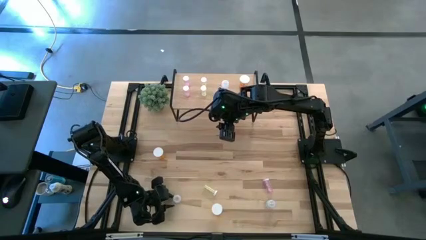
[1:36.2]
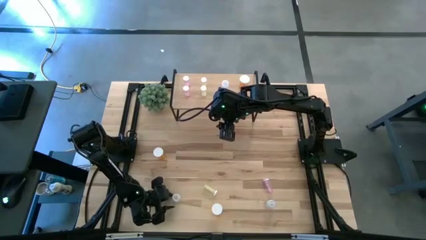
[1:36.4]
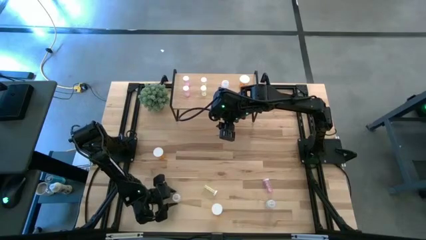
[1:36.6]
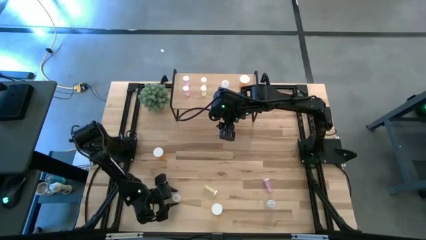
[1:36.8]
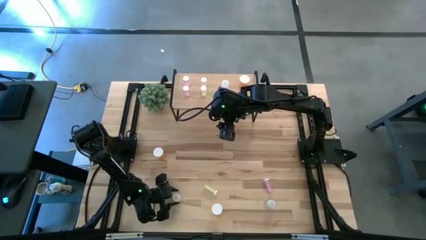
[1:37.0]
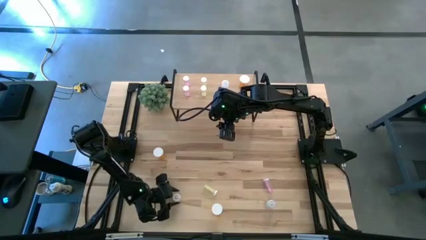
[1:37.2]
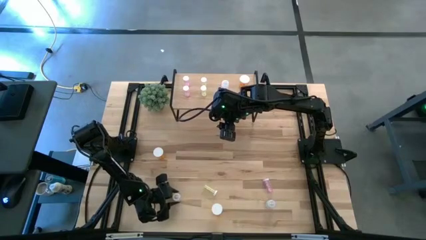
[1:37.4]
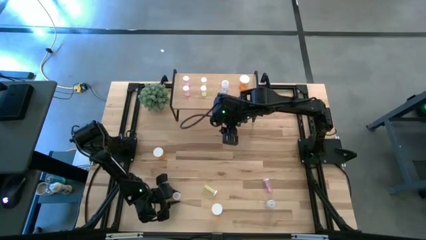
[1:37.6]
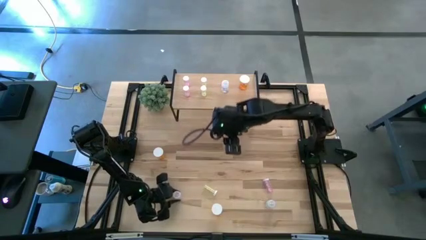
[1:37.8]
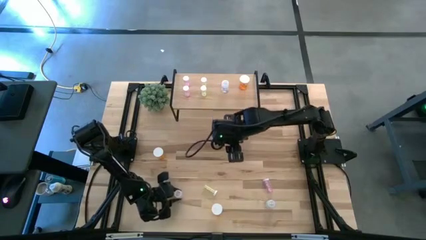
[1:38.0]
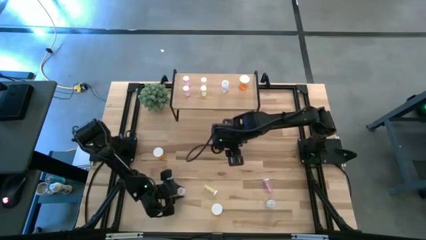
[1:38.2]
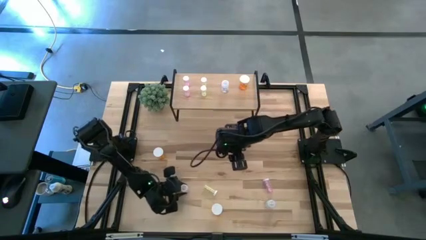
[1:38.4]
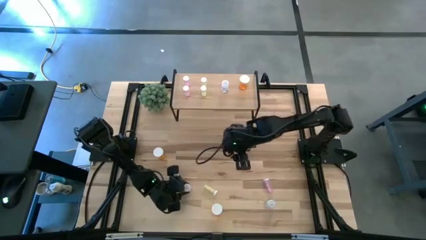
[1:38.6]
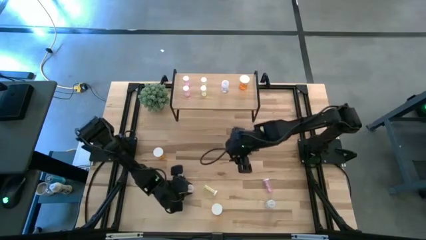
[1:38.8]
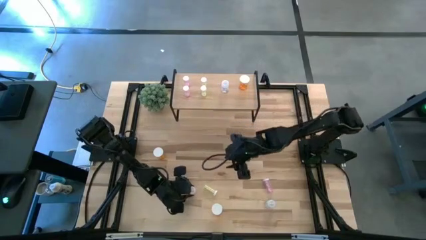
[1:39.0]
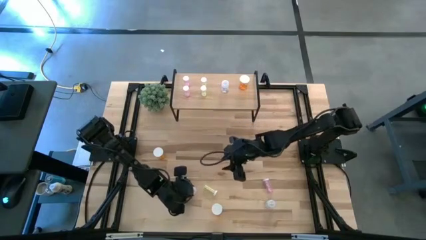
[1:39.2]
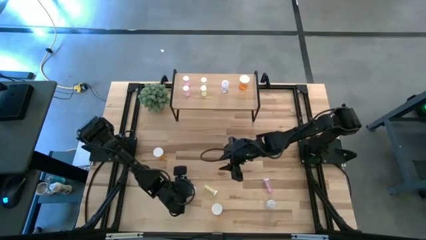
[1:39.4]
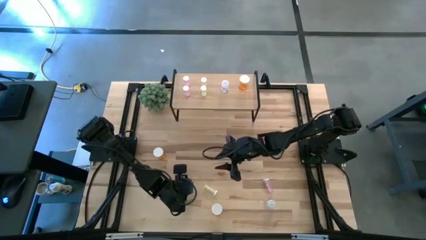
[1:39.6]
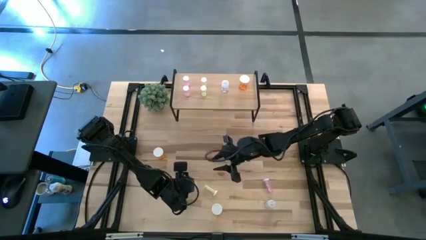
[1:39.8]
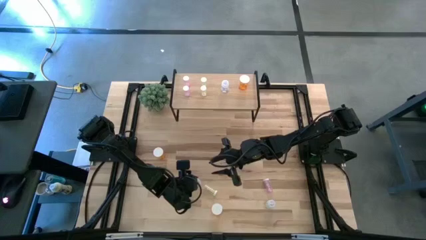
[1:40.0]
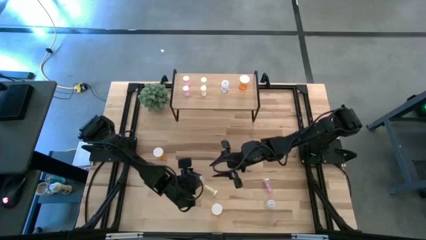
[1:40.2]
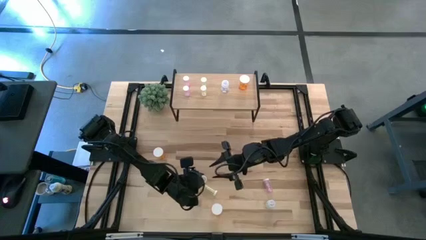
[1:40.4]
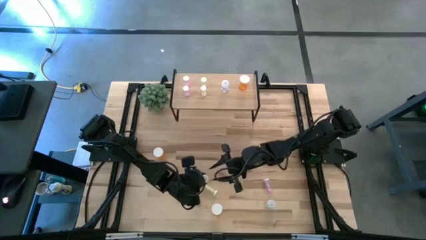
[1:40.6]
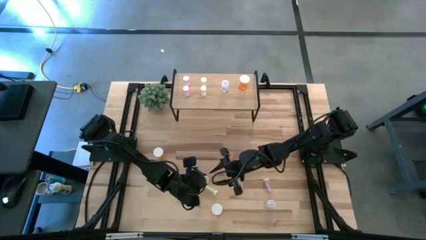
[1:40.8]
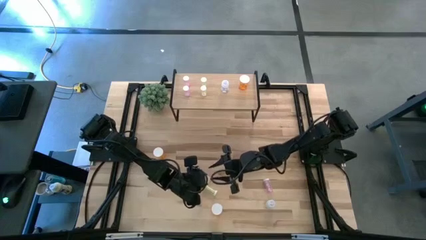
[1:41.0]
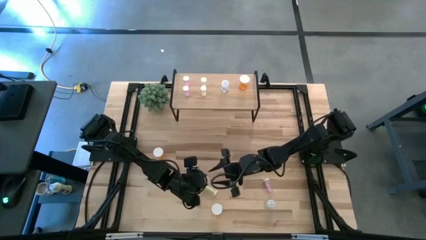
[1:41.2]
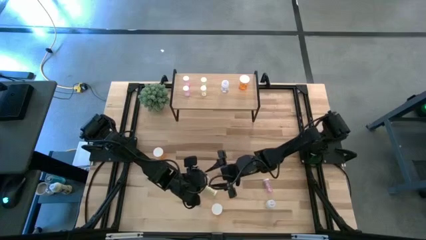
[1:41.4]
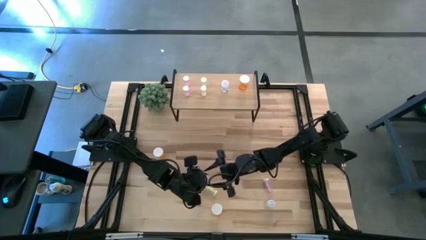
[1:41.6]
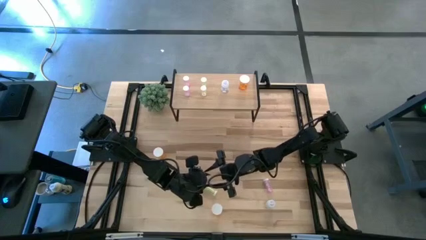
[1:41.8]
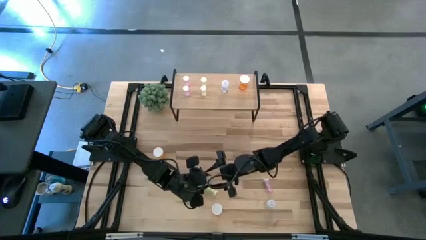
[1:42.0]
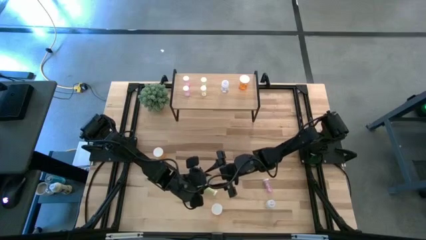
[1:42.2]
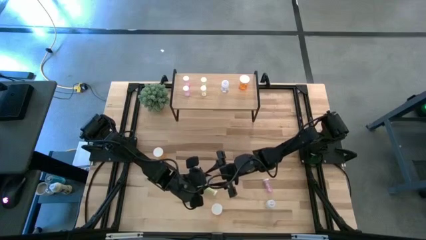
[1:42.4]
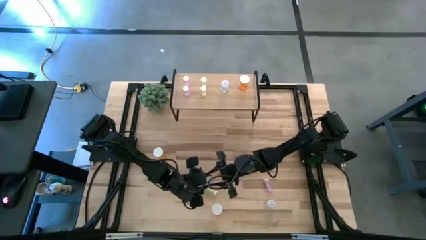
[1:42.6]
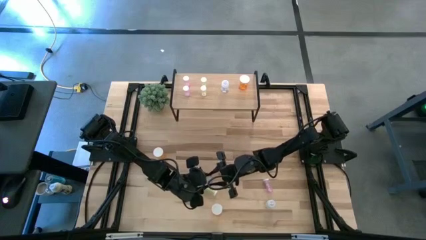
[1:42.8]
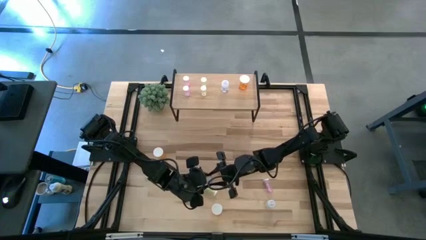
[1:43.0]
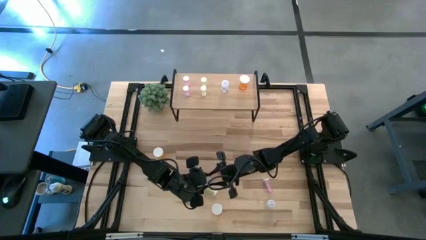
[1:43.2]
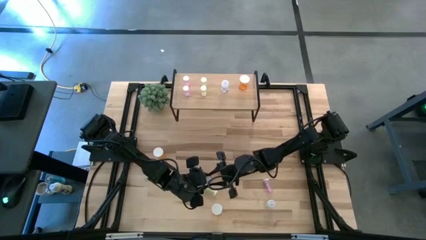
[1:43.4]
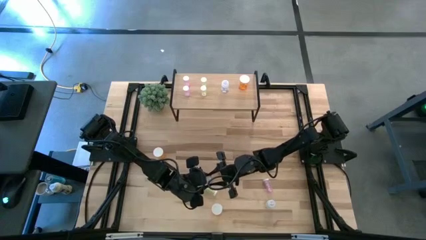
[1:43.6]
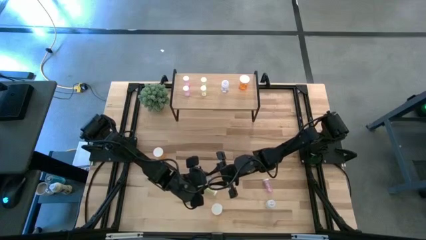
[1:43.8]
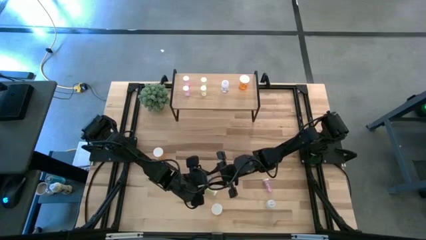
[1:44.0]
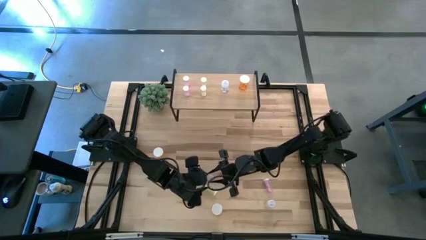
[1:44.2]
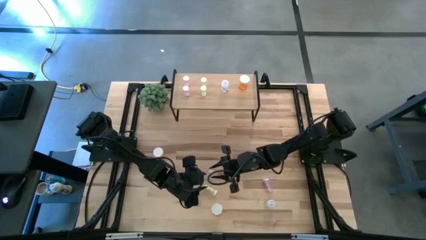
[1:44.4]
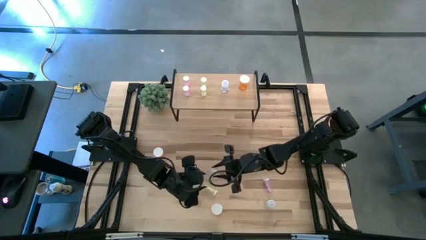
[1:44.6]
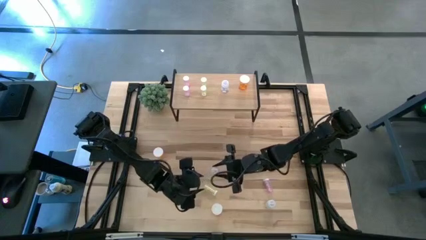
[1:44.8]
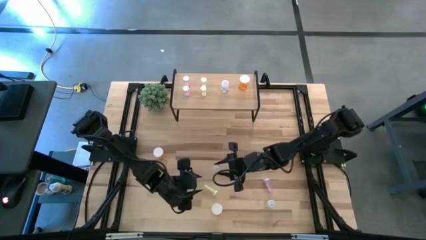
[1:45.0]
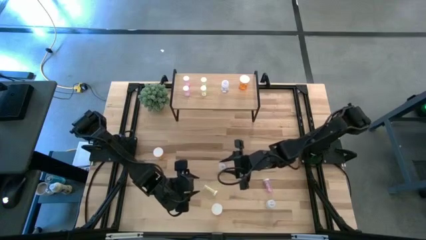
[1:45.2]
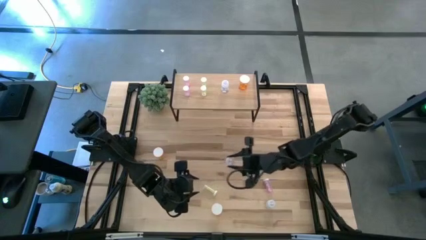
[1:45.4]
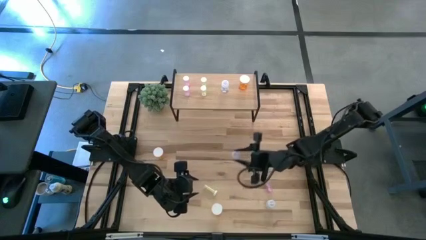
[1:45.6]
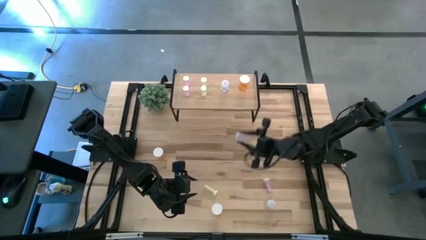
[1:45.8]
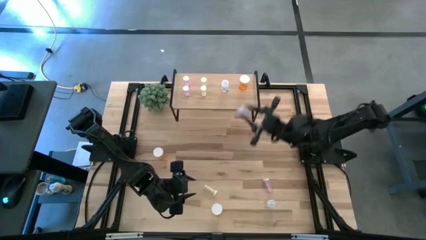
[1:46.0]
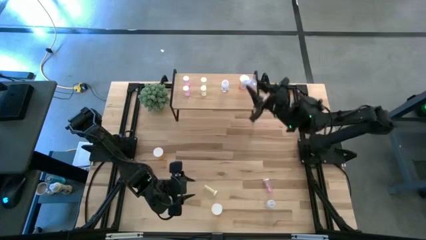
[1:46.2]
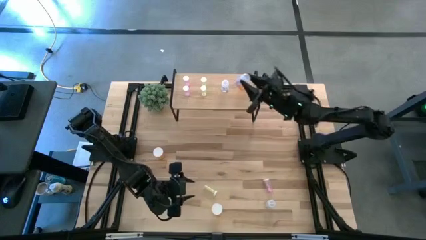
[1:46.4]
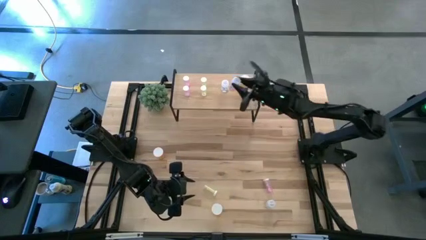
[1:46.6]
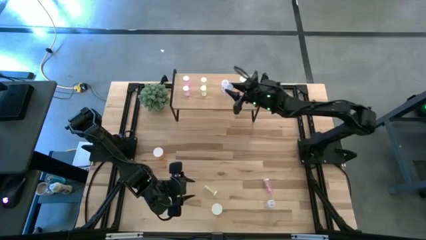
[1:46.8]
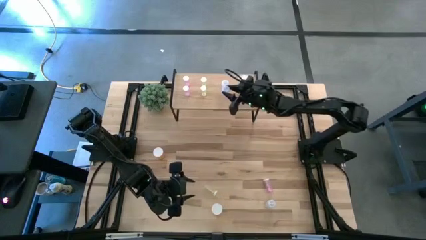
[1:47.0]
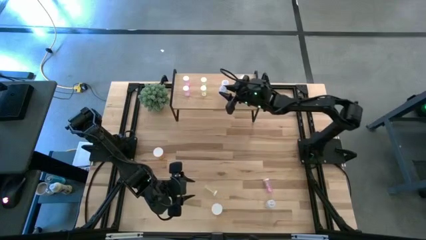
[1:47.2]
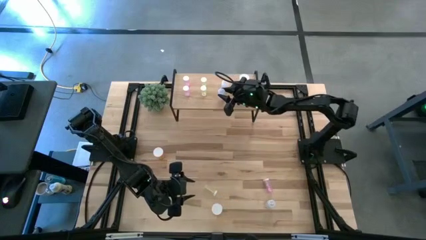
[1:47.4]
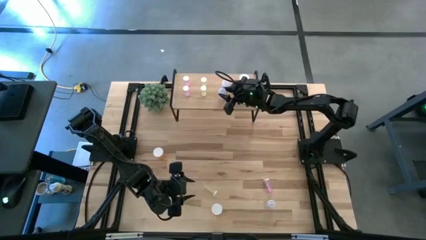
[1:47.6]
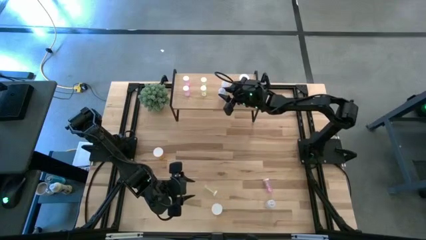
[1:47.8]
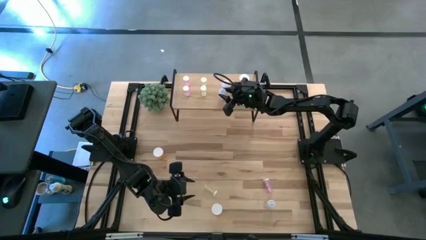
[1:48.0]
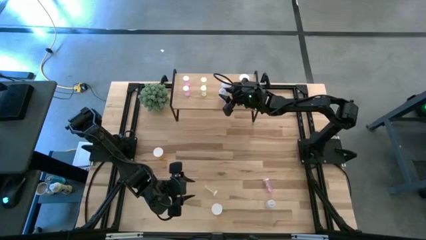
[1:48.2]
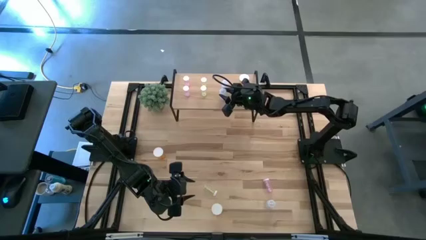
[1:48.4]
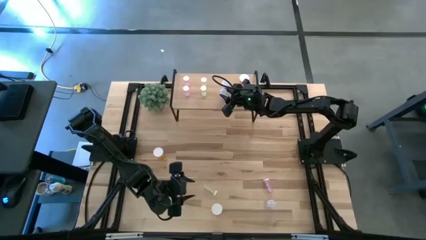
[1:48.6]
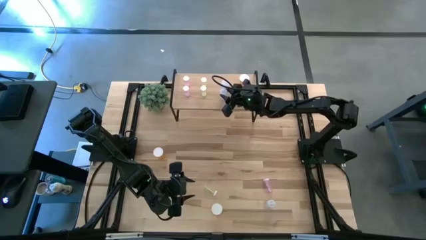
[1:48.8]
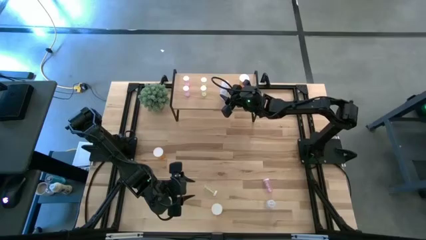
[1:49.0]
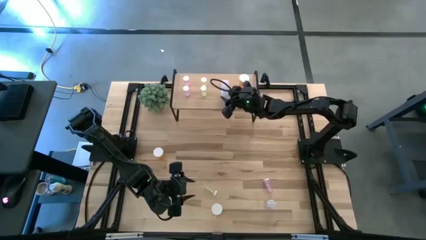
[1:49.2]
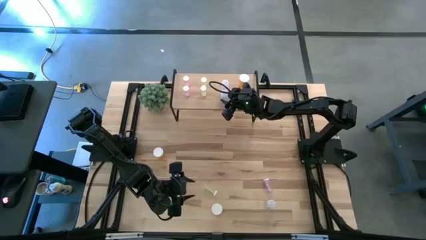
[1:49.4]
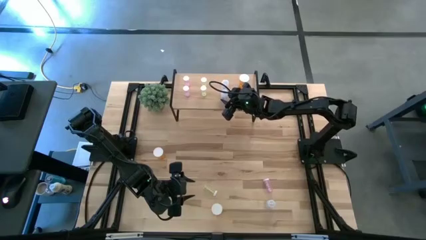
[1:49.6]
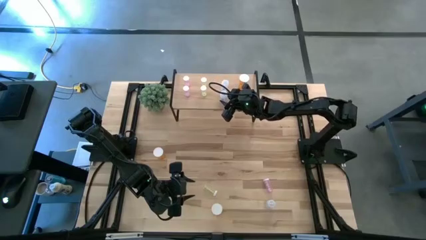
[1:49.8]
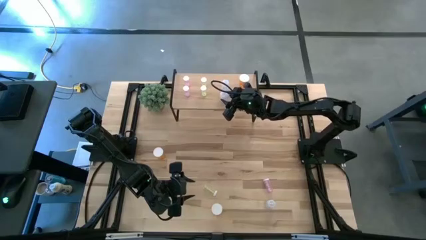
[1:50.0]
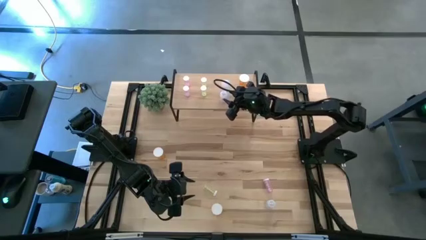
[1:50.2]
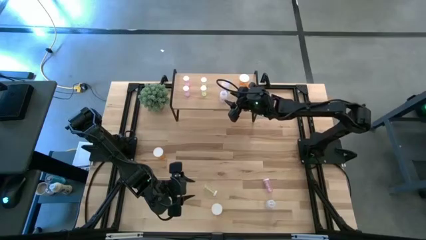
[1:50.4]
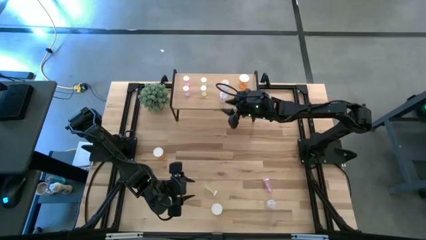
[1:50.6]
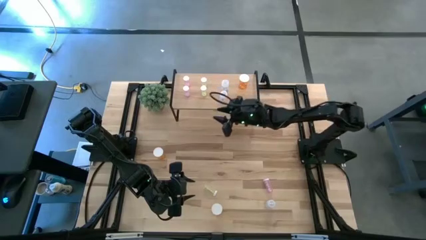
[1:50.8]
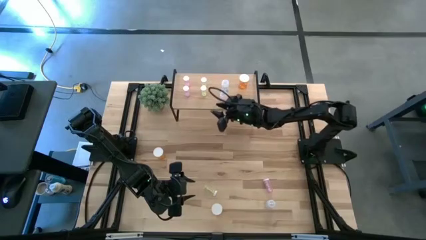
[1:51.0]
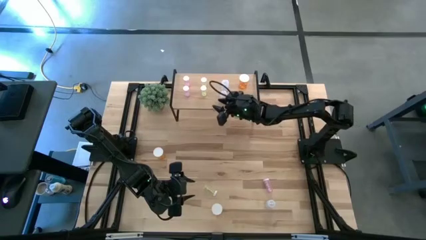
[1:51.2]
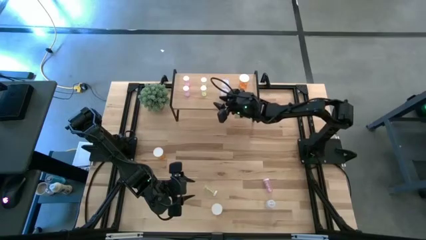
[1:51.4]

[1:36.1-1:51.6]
Task: Pick and place medicine bottles onto shelf by color
Put the left transparent pill bottle aligned with the other transparent pill bottle on the shelf

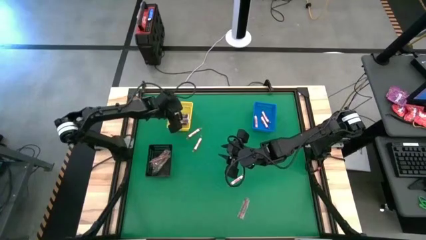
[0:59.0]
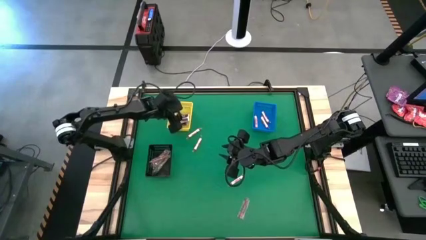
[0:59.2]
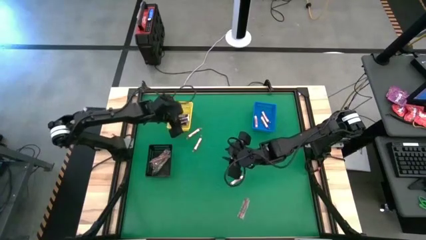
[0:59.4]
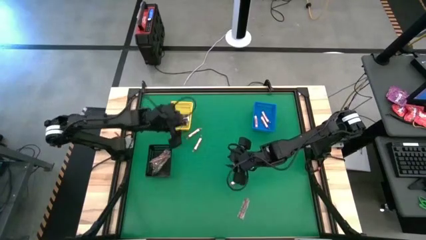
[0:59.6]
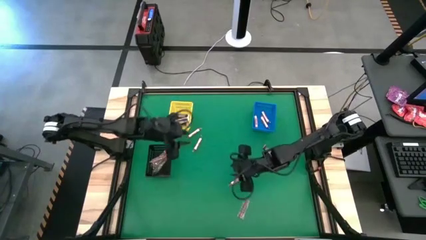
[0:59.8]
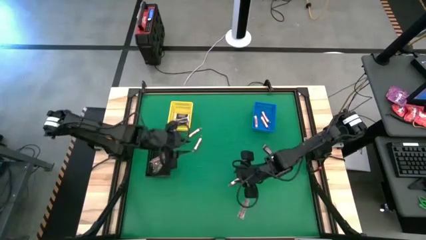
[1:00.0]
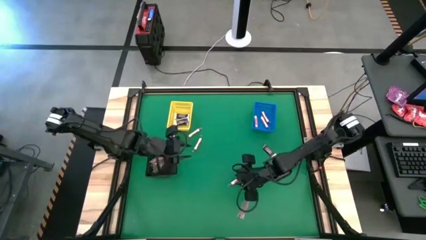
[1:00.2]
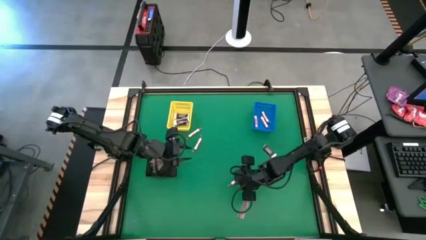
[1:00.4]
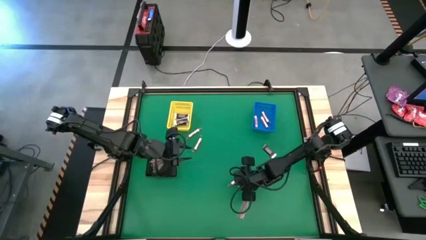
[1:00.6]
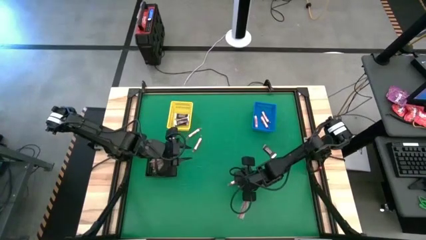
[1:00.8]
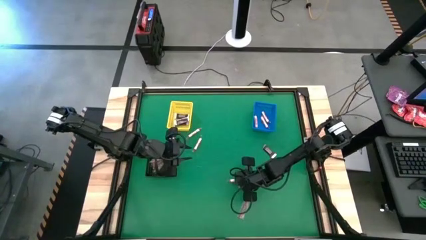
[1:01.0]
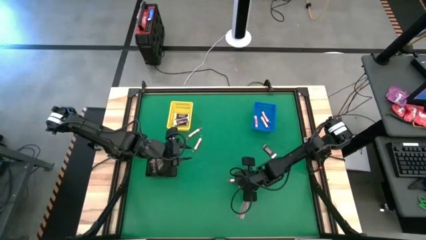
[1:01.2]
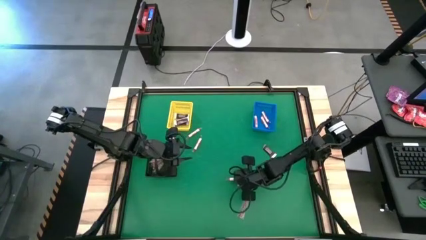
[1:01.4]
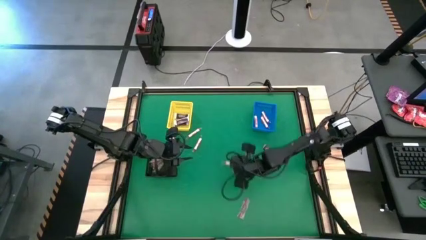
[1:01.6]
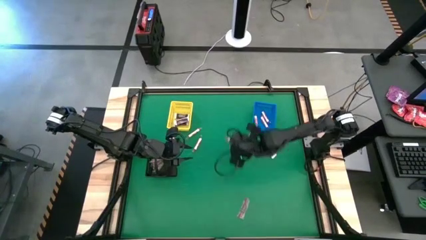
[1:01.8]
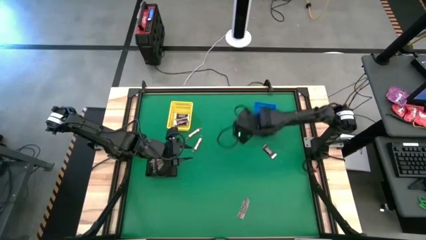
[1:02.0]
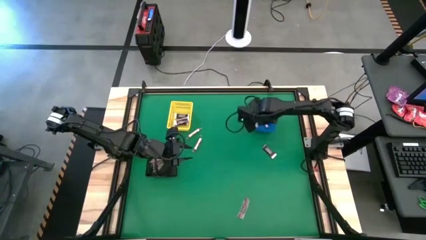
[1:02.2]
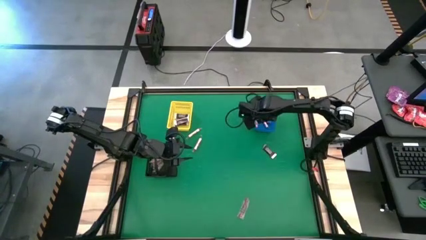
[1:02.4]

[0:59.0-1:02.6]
Task: Sort candy by brand, put in halloween buckets
Put the white candy stick into the blue bin
